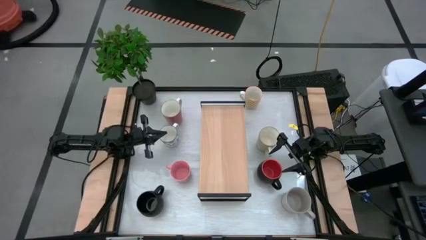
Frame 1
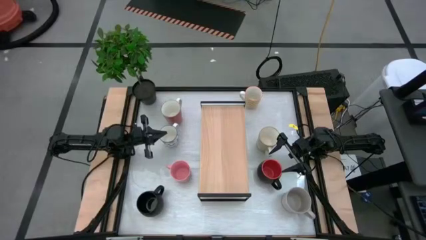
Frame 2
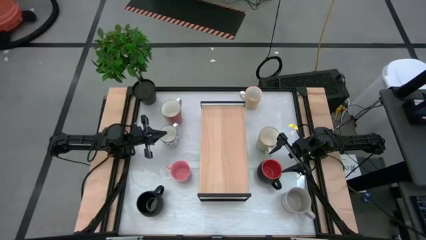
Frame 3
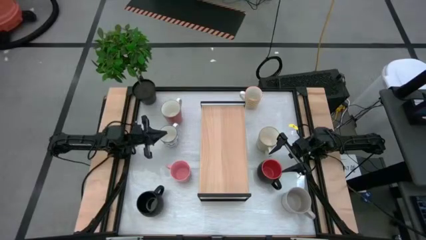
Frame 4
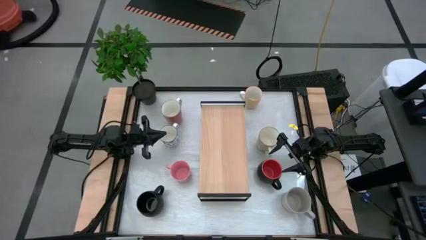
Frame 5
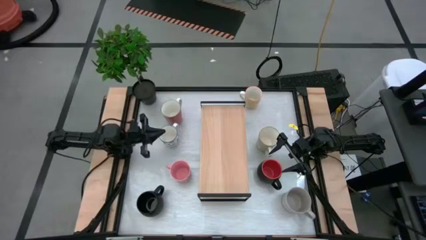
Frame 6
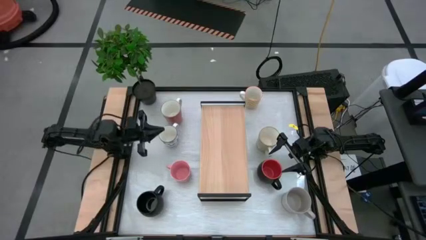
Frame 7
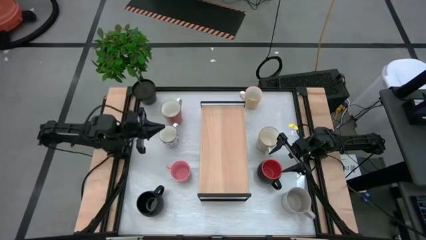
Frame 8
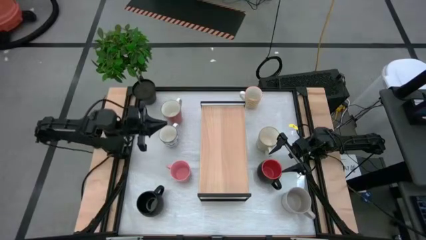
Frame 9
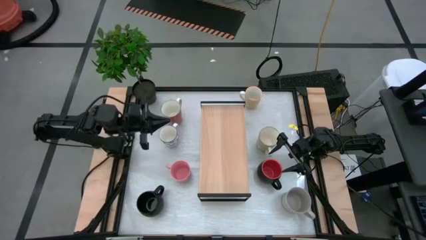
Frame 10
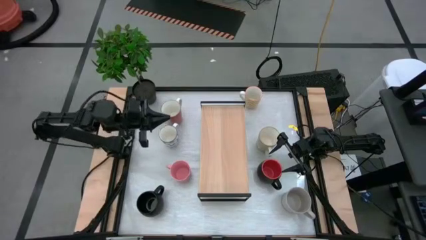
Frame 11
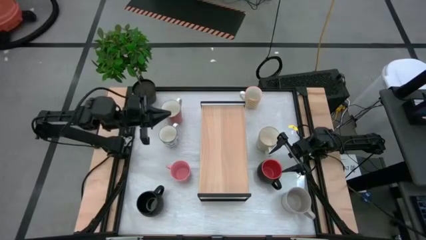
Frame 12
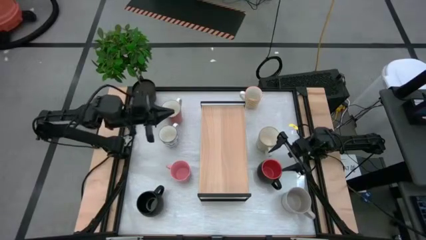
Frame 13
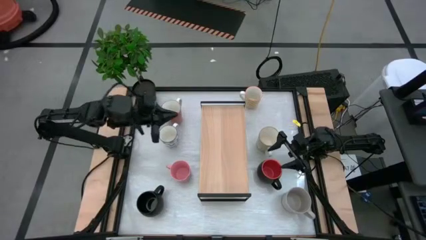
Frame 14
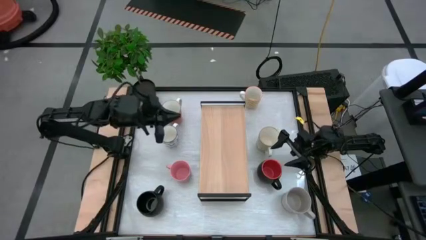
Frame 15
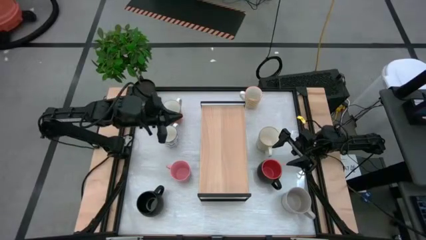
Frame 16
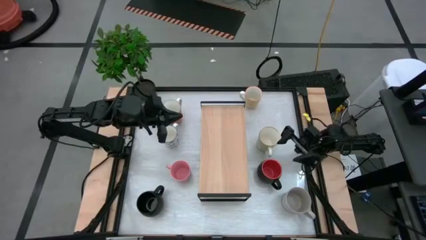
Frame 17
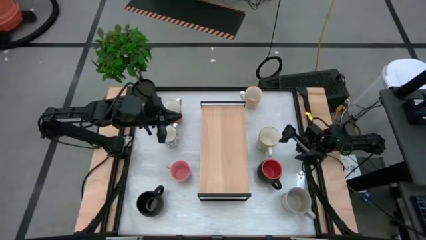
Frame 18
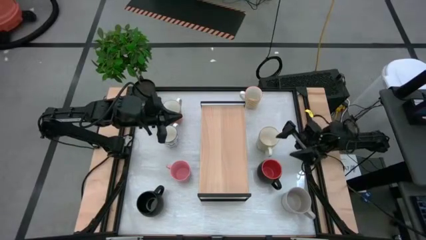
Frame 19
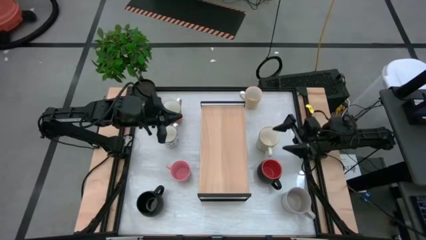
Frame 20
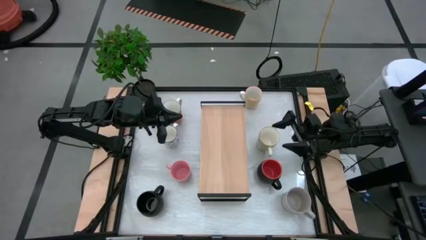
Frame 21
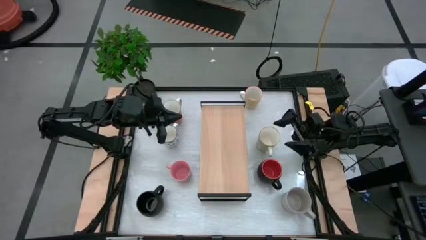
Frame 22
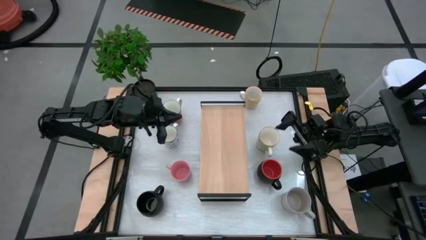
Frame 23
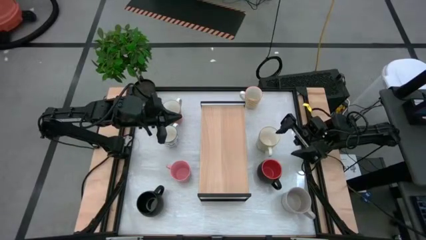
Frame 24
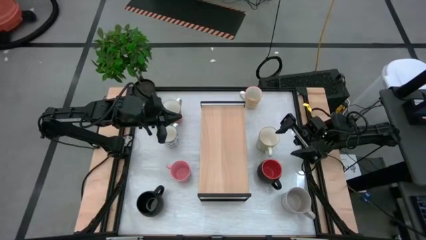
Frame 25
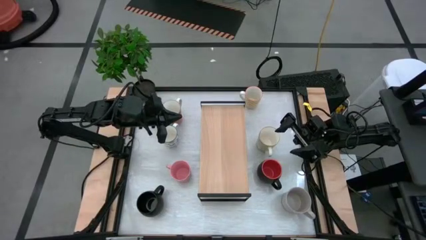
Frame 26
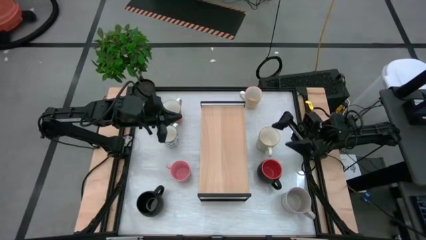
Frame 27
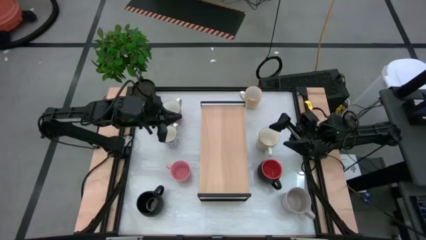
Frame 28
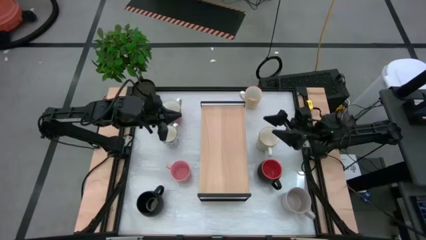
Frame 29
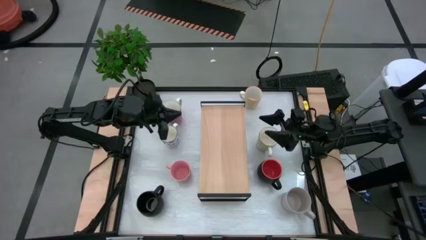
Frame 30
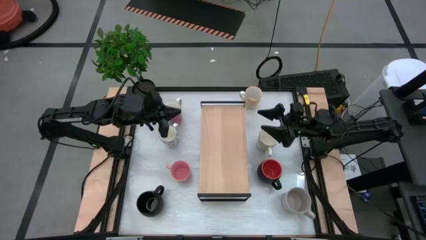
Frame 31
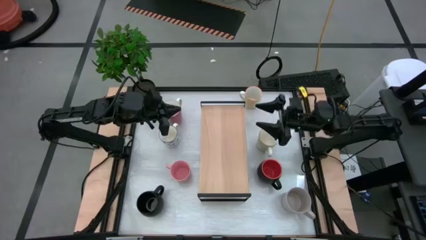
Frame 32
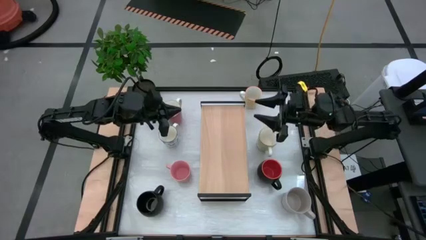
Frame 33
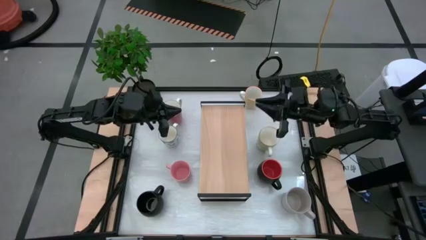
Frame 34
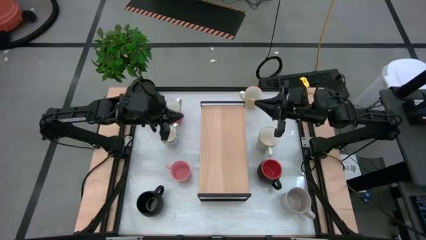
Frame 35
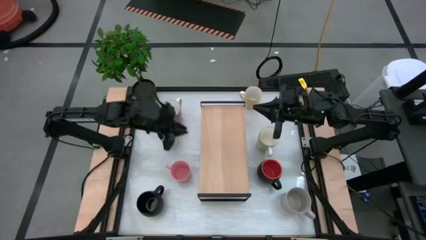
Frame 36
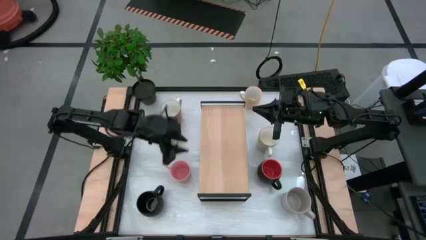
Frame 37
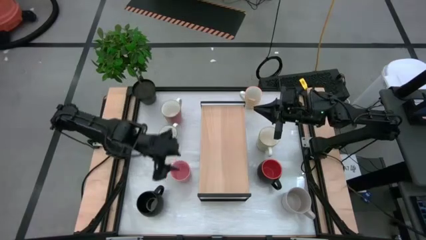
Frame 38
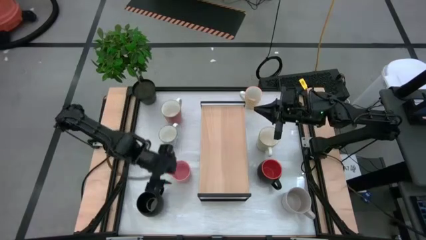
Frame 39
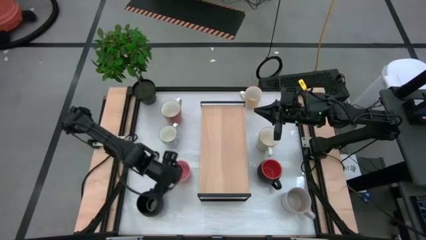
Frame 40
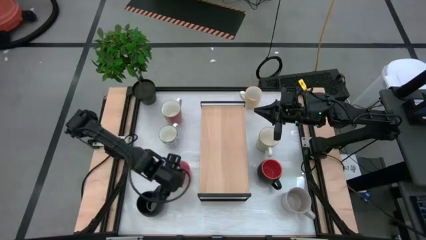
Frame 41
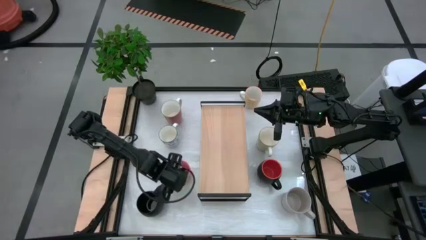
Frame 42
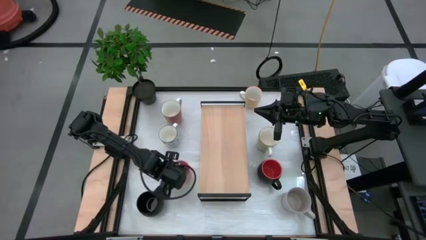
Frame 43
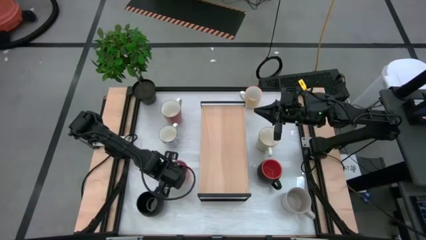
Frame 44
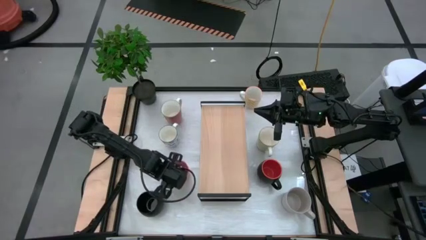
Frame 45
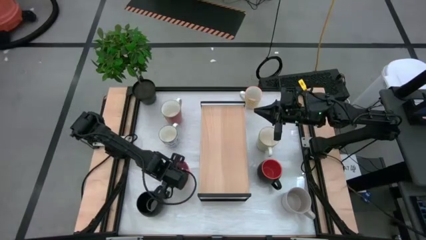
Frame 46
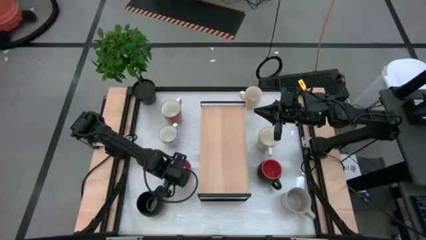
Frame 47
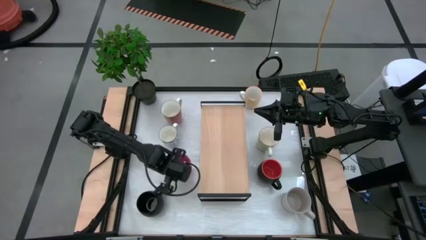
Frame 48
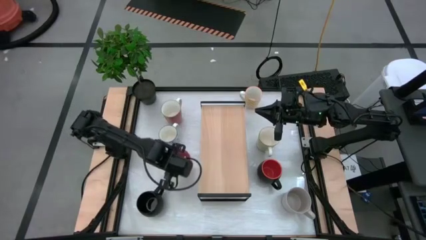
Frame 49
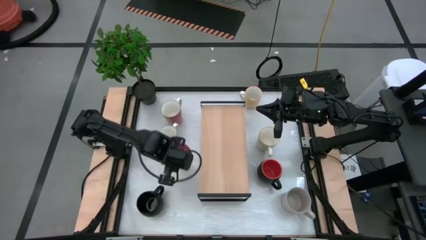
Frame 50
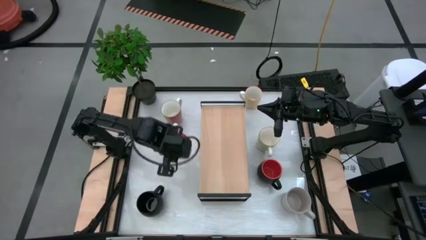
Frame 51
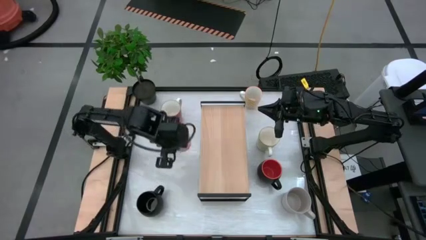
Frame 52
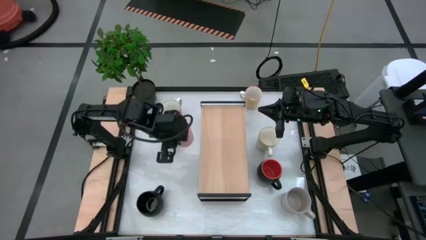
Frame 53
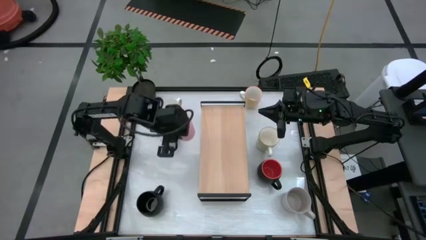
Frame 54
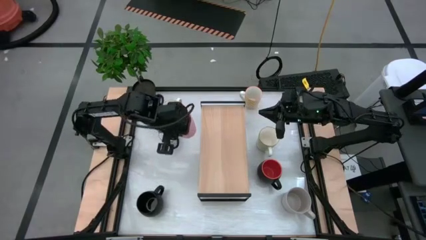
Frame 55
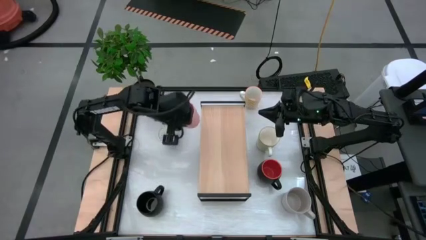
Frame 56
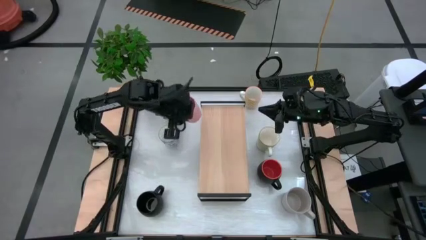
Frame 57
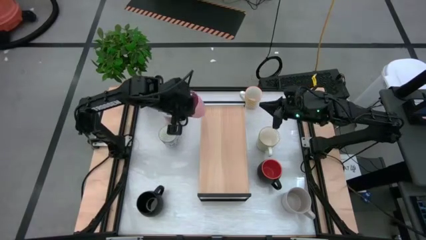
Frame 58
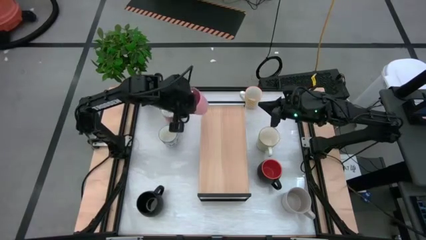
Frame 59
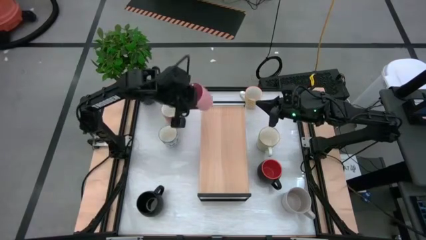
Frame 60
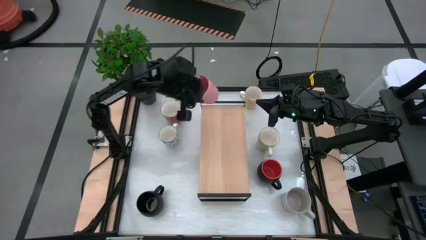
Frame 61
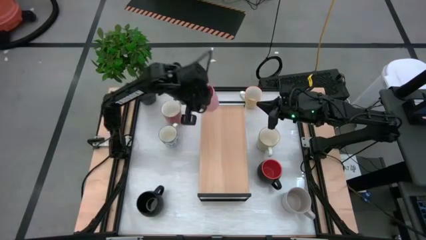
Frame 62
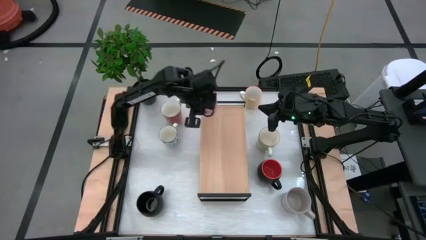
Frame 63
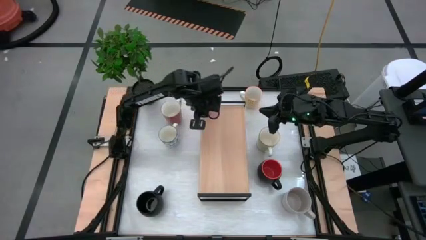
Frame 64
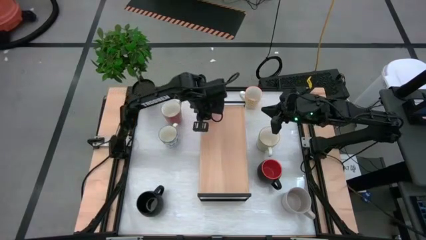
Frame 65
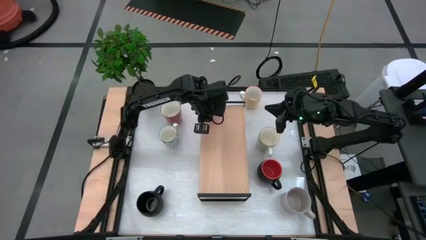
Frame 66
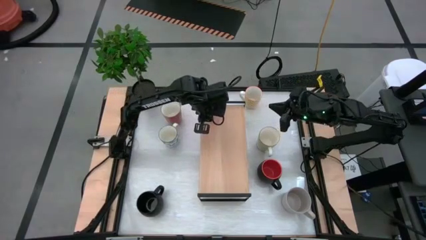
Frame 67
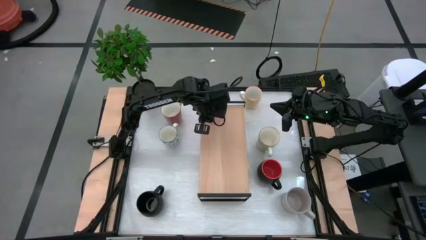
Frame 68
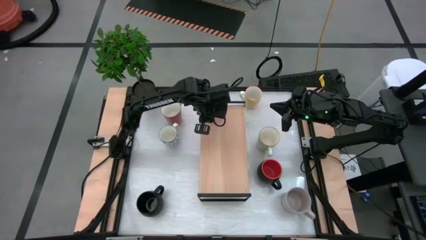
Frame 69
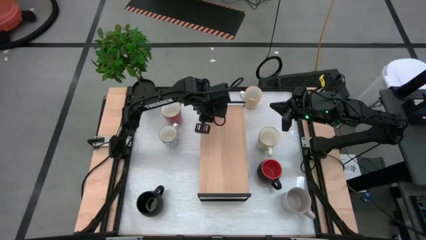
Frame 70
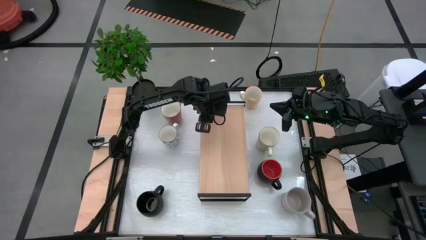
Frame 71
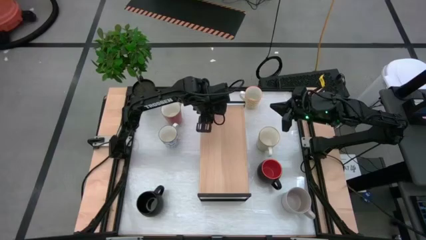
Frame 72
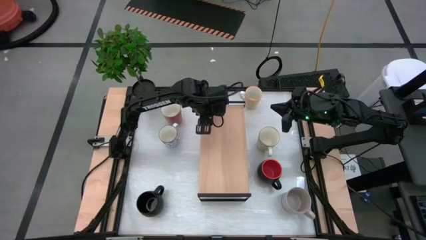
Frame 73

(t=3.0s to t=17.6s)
Task: Place coffee mugs
Put the pink mug on the shelf
